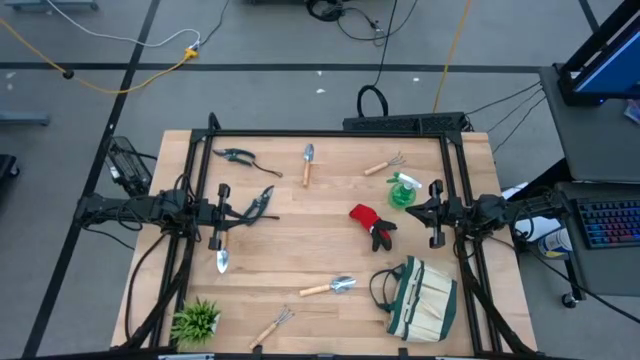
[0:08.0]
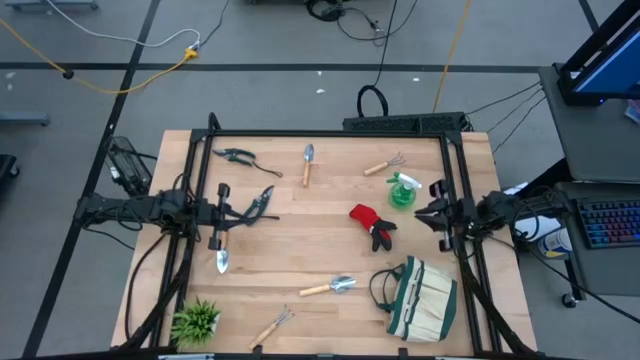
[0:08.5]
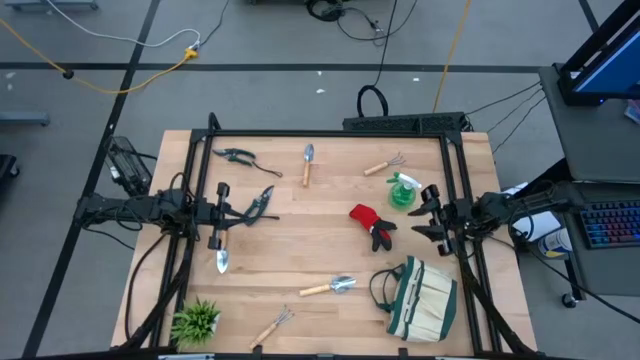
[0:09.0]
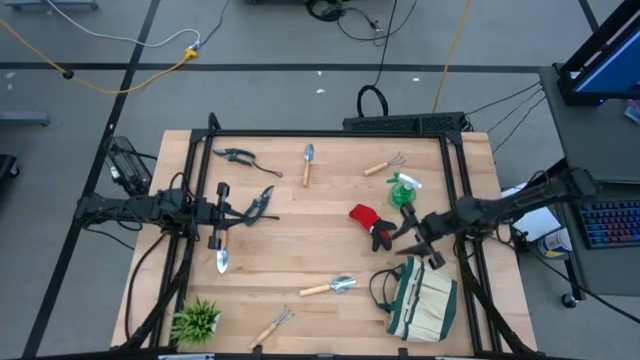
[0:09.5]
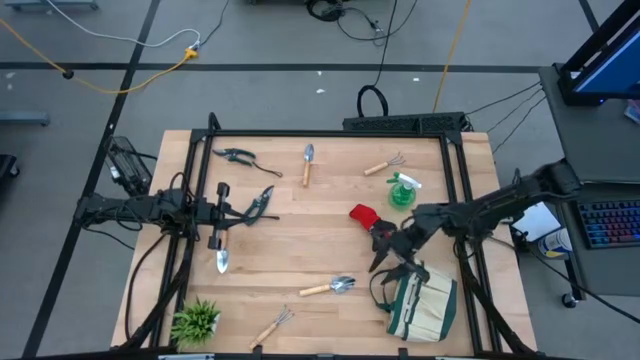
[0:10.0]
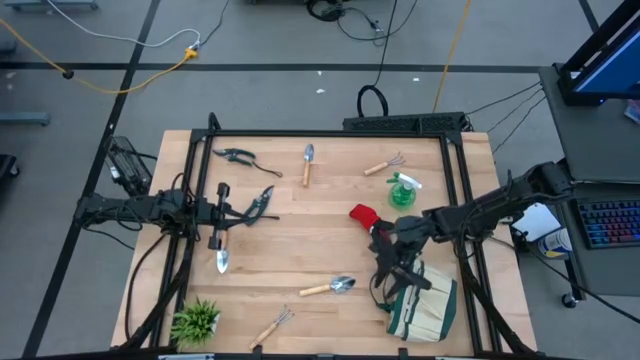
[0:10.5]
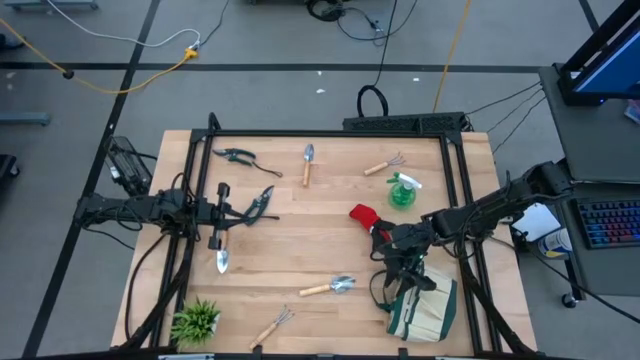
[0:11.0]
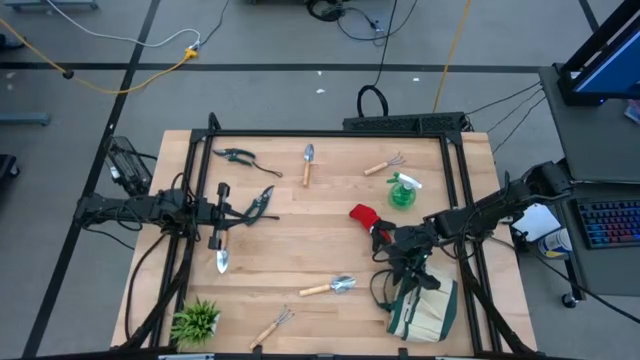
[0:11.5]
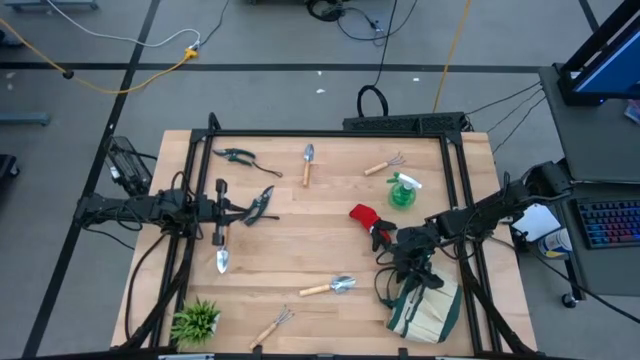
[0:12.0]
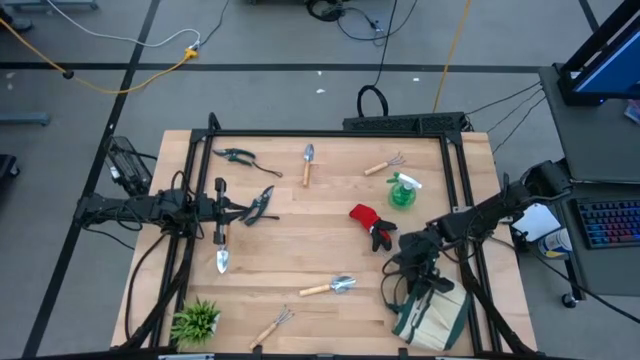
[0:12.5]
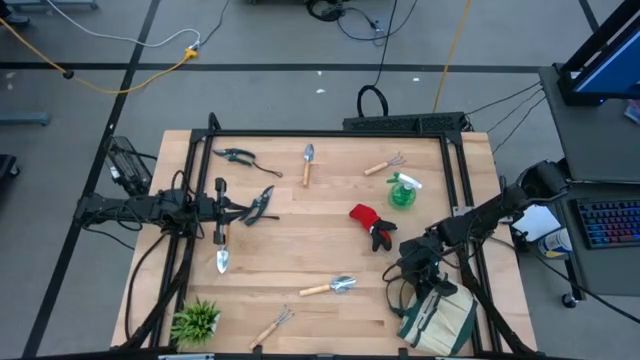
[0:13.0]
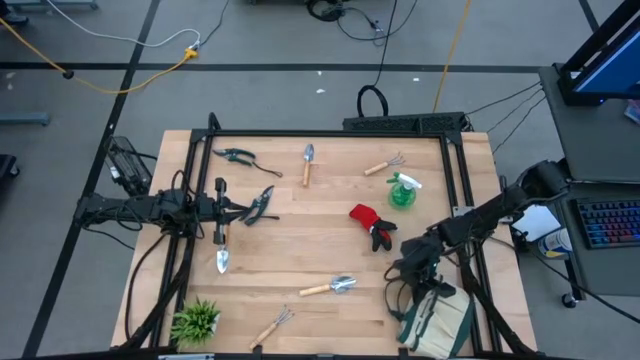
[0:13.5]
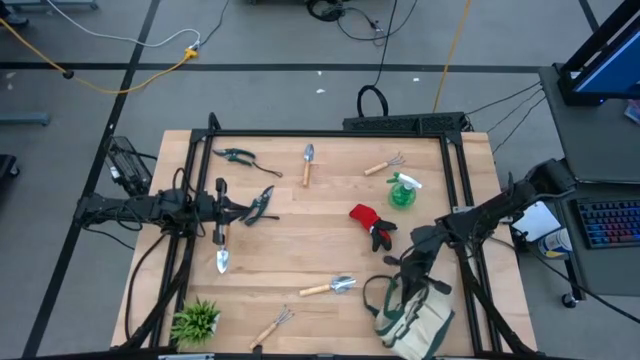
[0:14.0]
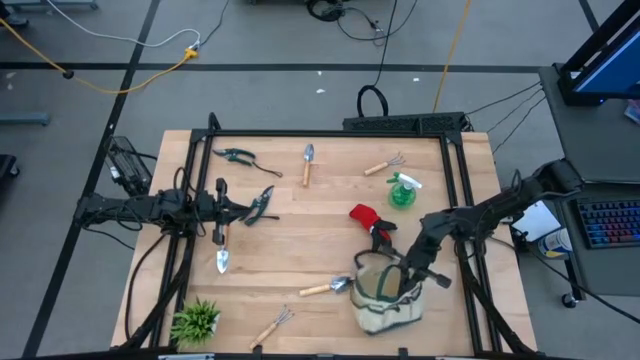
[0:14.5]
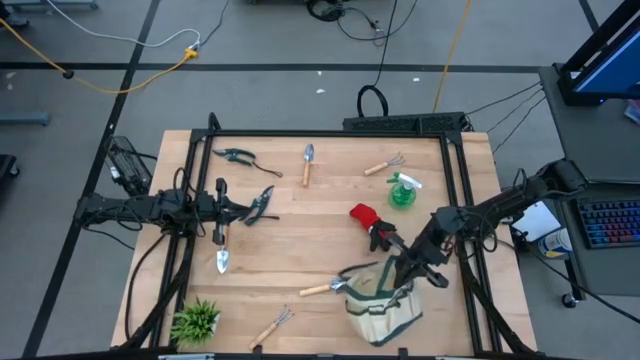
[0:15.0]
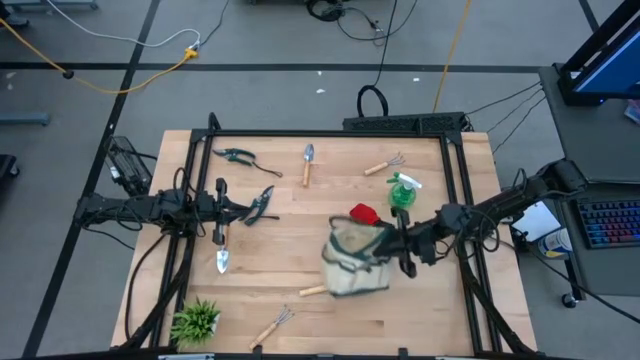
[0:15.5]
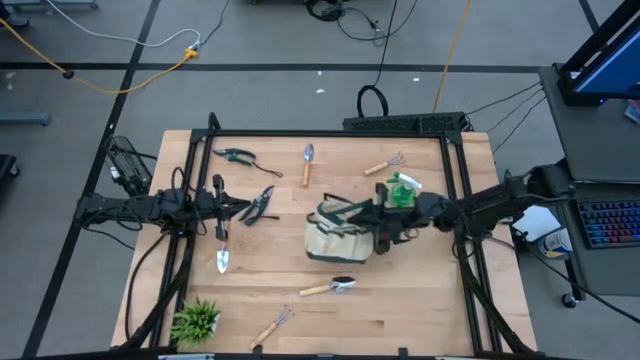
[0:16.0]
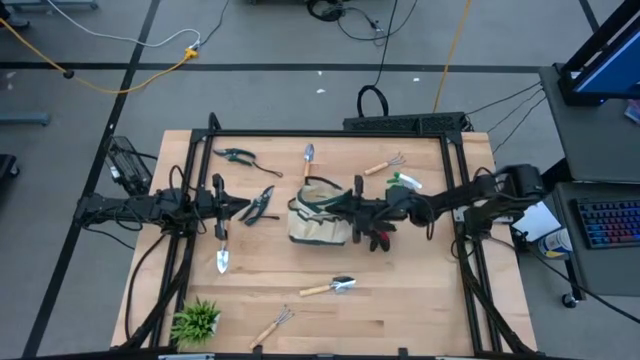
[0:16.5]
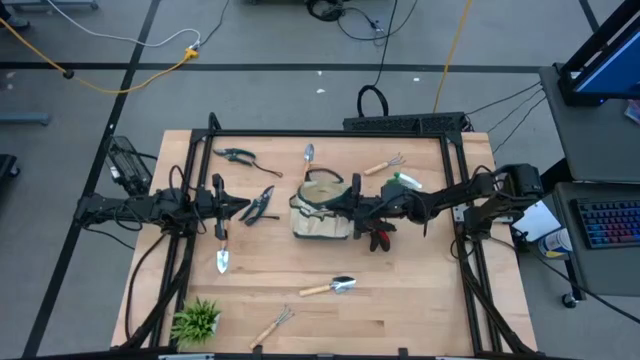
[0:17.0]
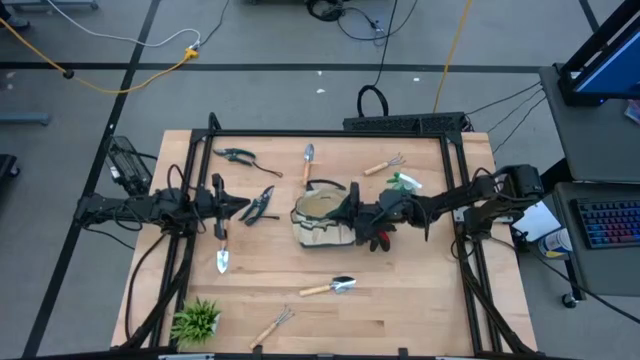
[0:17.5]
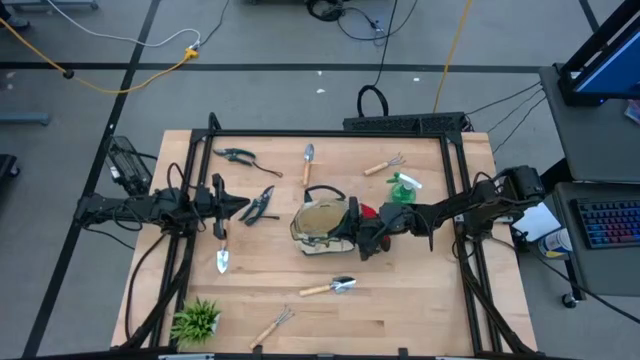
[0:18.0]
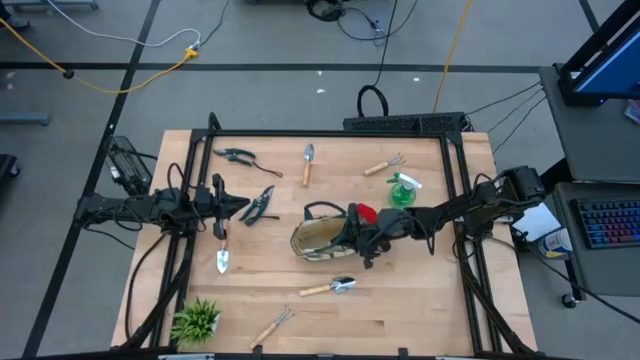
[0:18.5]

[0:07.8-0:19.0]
Task: Pick & Place Garden tools in Gardening bag
Move the green gardening bag to the center of the table

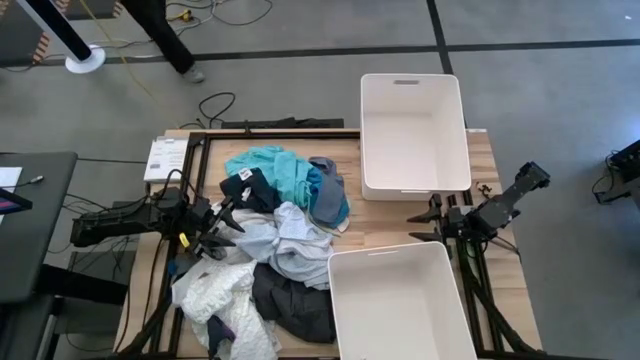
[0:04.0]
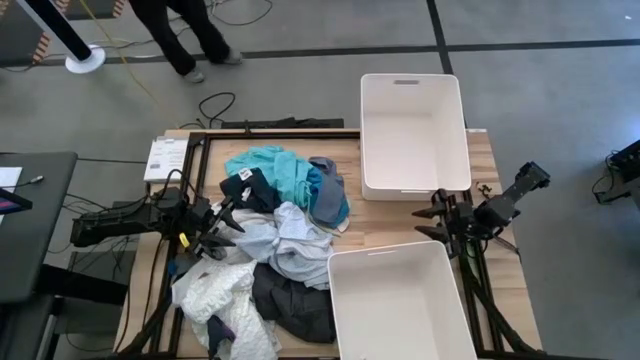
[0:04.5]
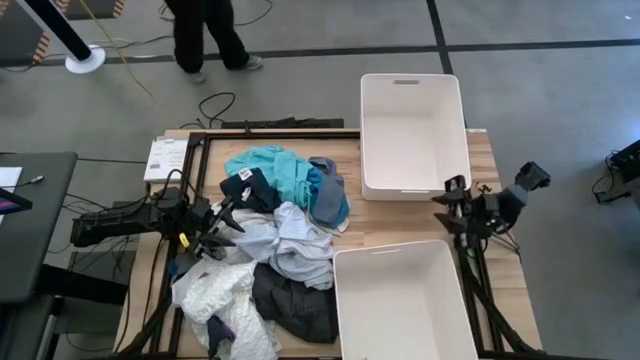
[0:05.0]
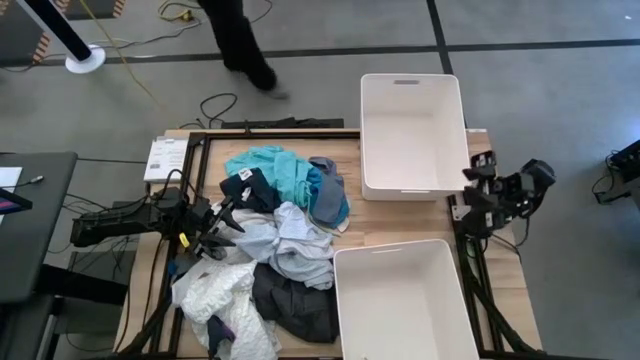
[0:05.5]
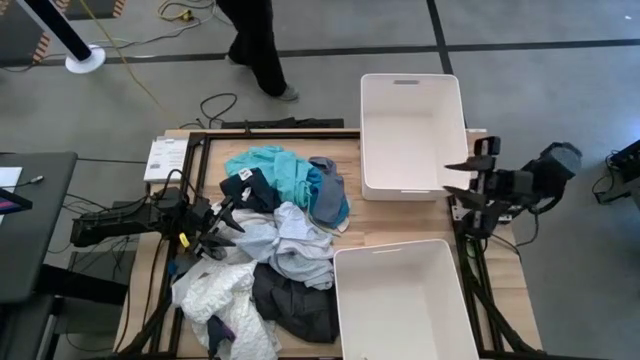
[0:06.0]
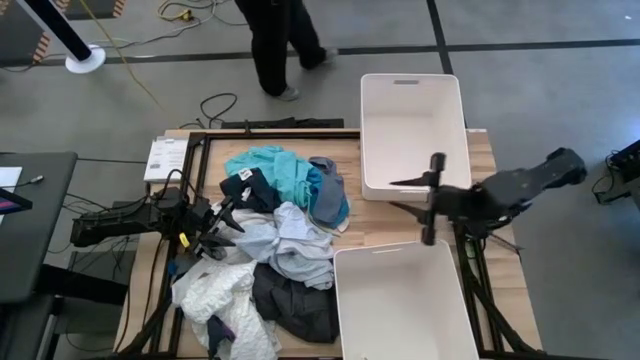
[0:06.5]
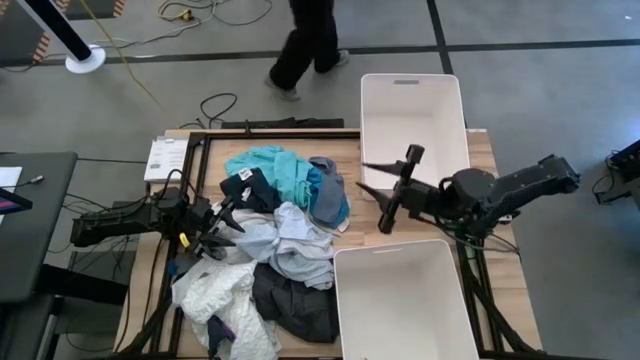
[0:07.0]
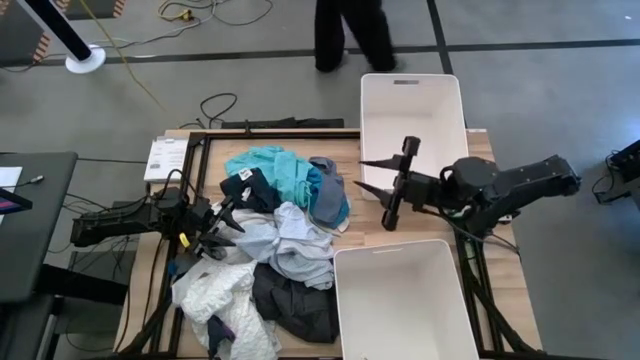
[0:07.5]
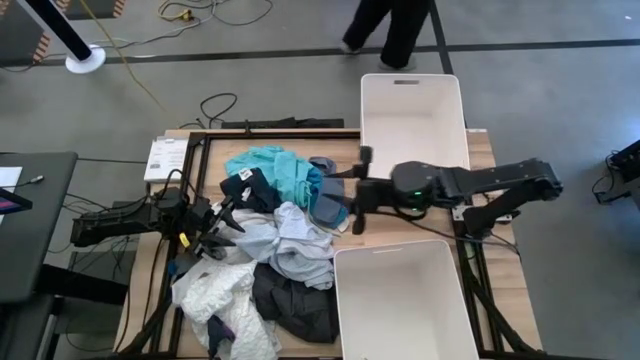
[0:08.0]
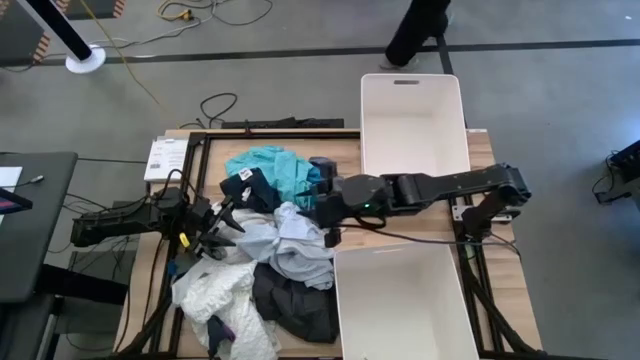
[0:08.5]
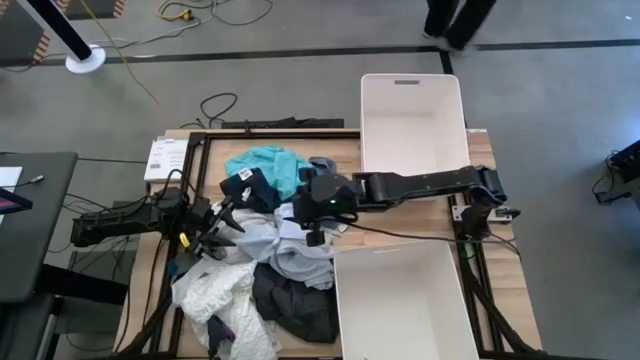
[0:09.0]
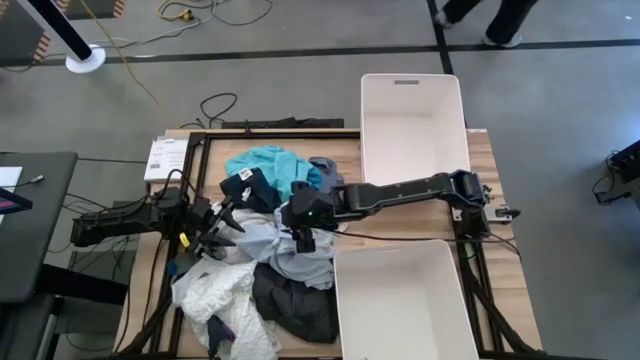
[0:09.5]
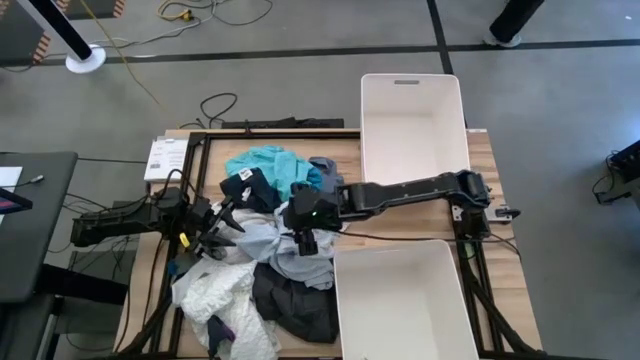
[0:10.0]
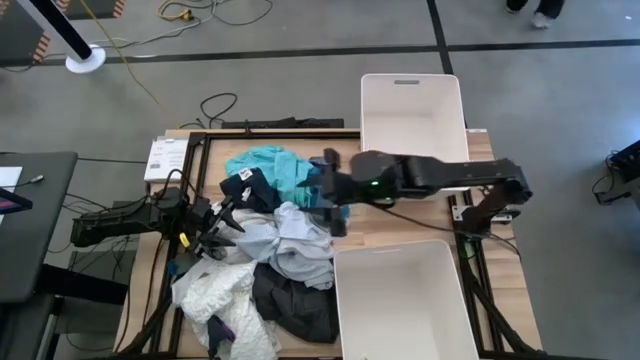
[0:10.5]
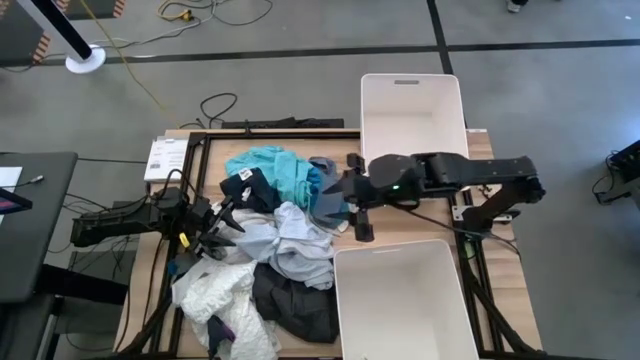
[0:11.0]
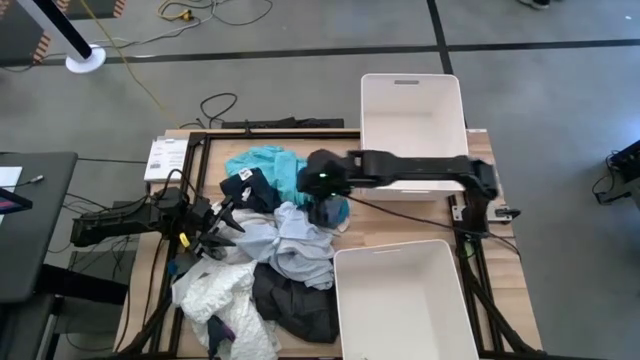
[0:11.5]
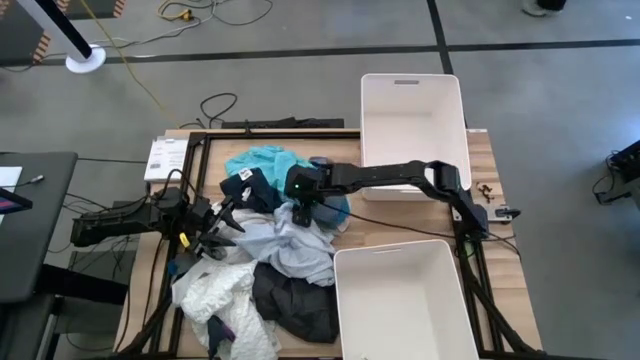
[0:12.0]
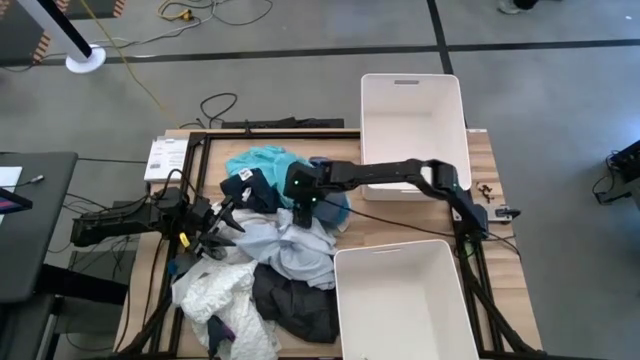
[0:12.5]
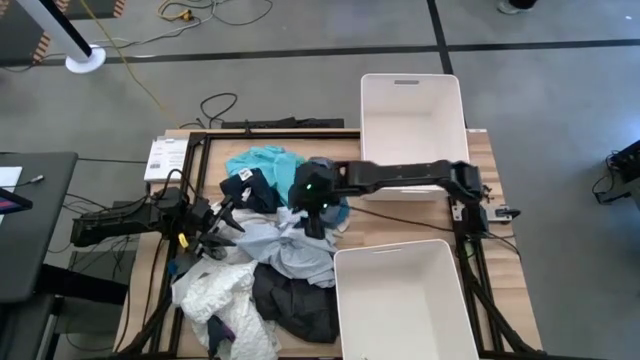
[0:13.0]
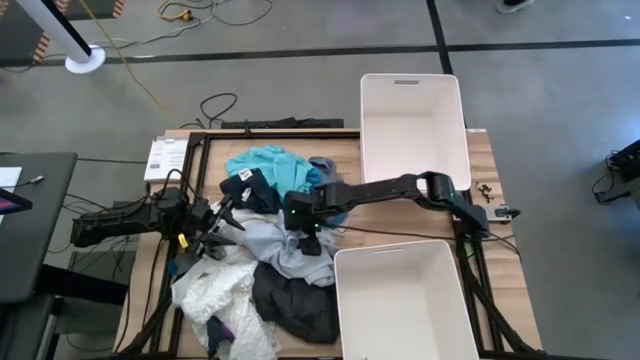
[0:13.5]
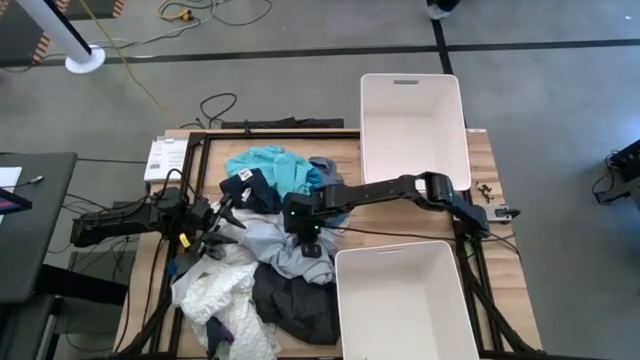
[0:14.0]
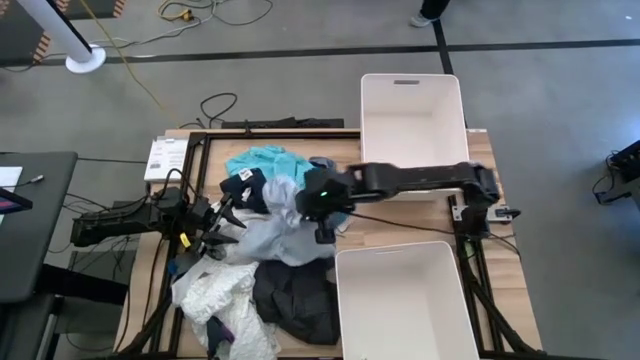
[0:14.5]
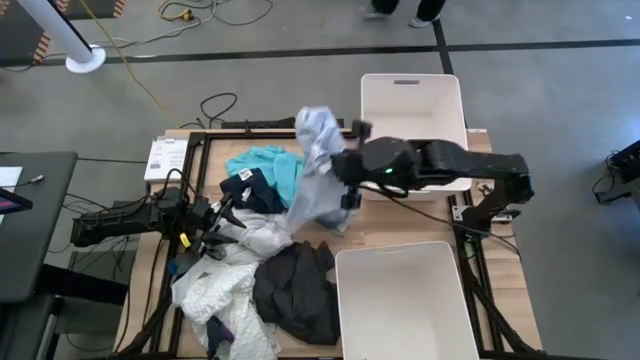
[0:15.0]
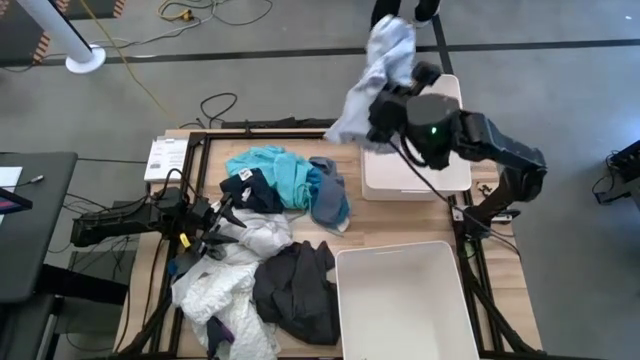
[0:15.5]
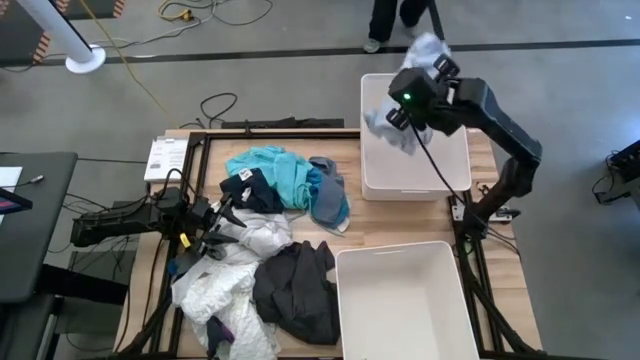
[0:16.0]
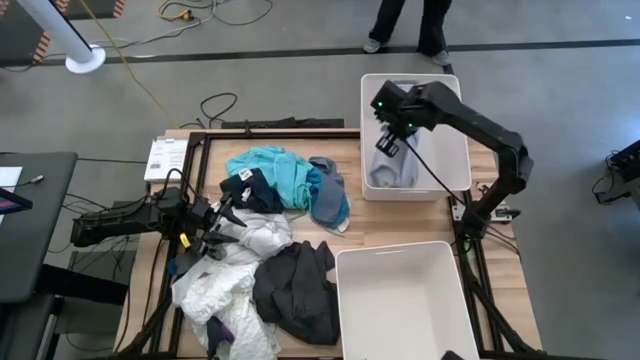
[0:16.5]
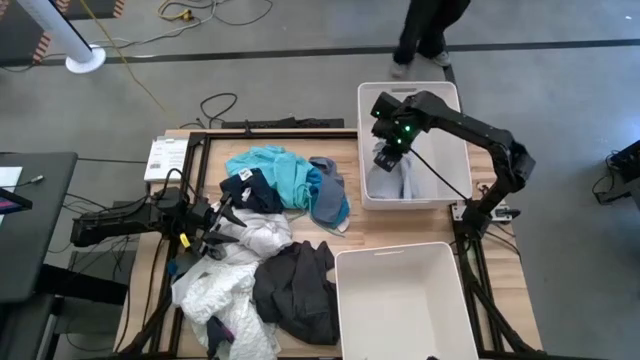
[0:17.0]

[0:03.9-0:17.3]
Task: Sort clothes
Put the blue shirt into the top white laundry bin
